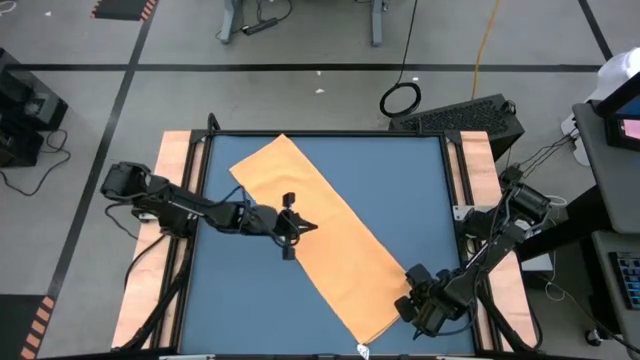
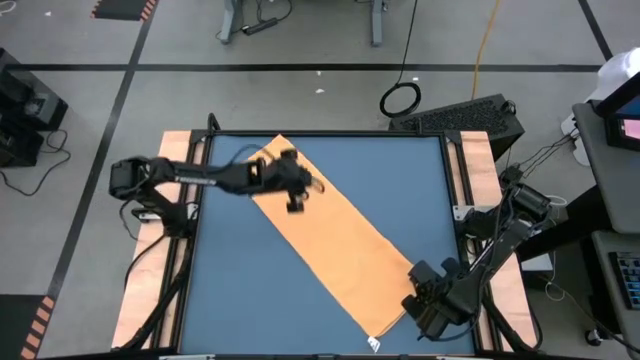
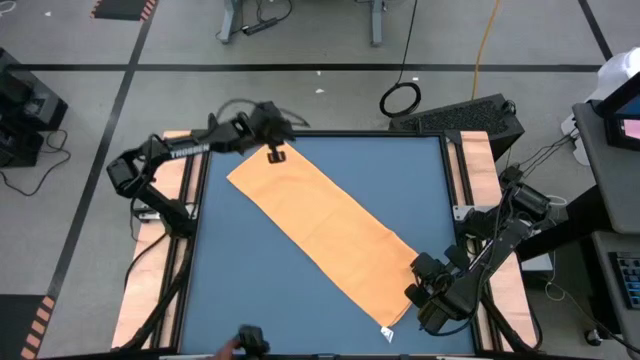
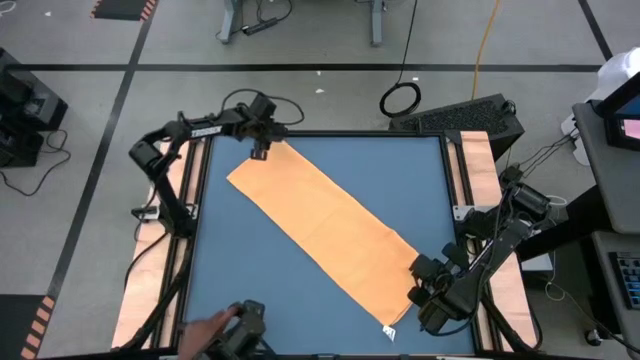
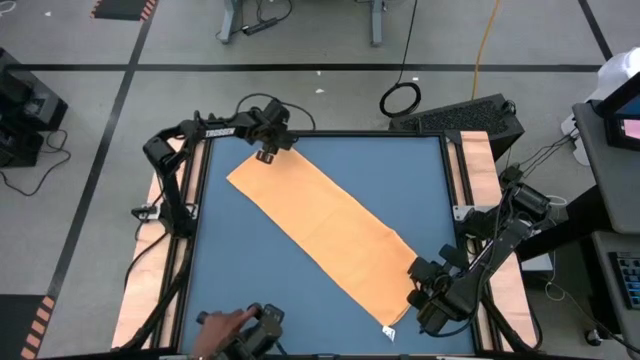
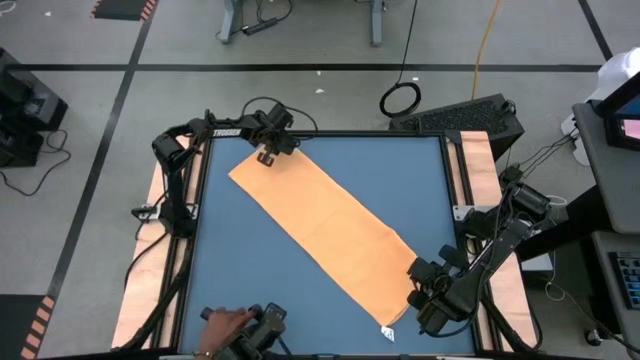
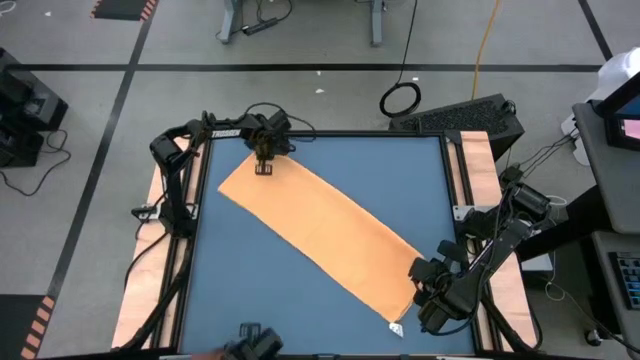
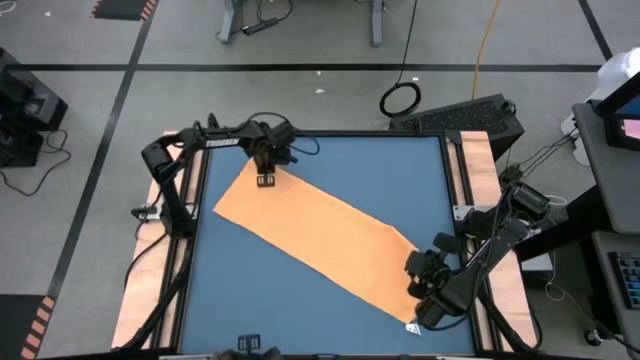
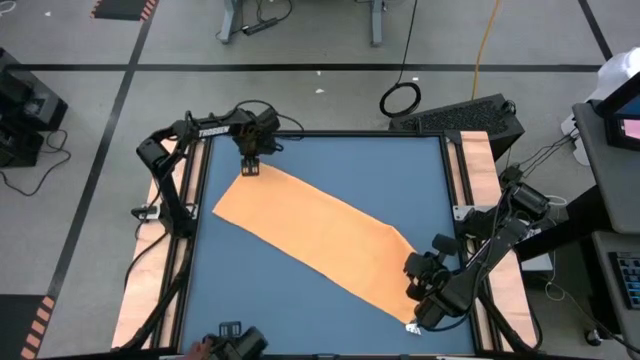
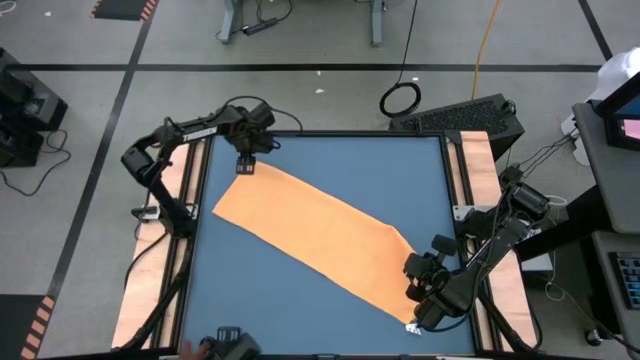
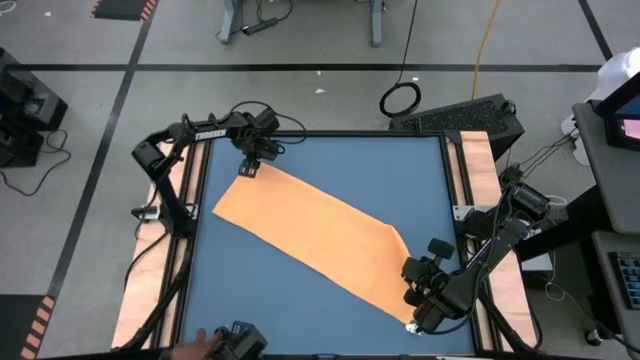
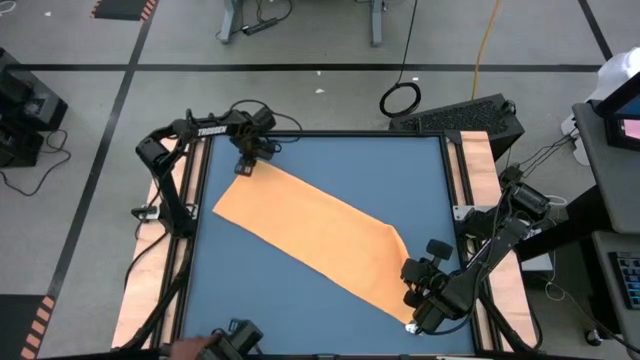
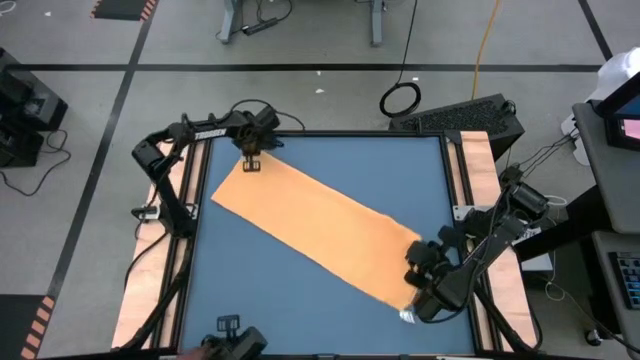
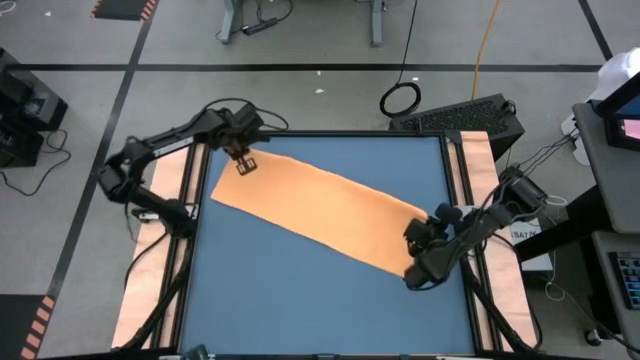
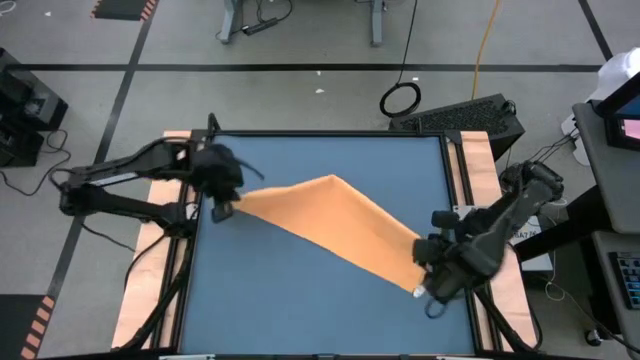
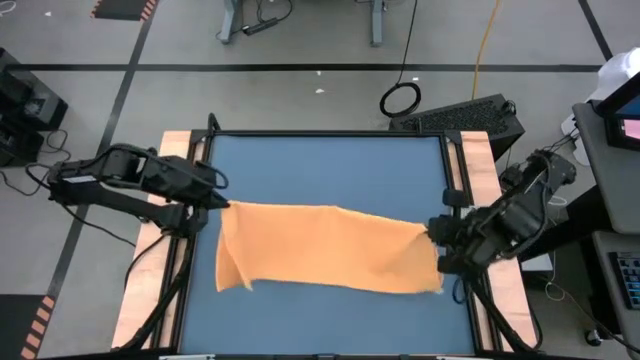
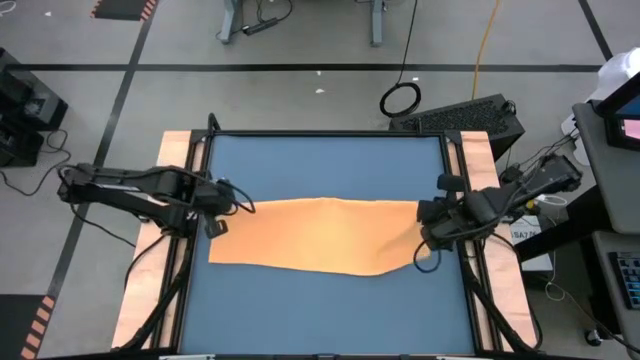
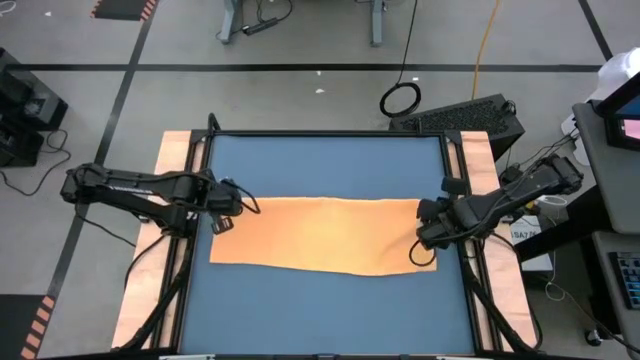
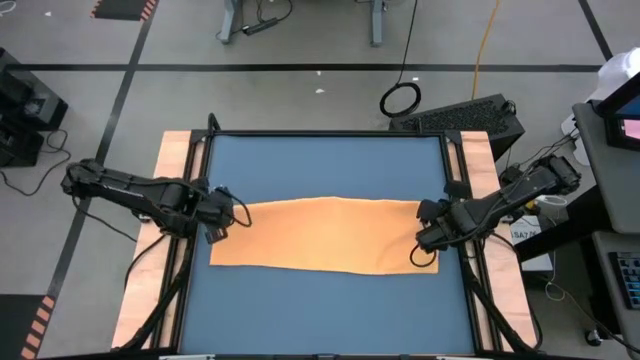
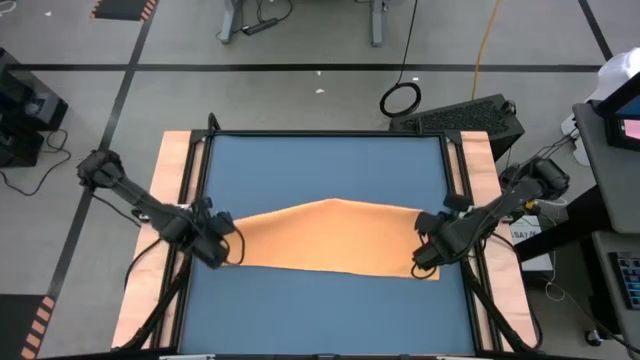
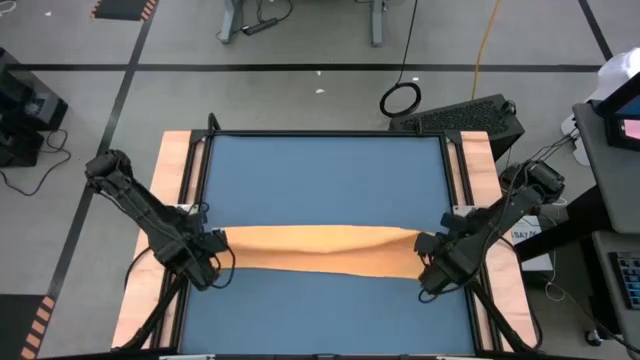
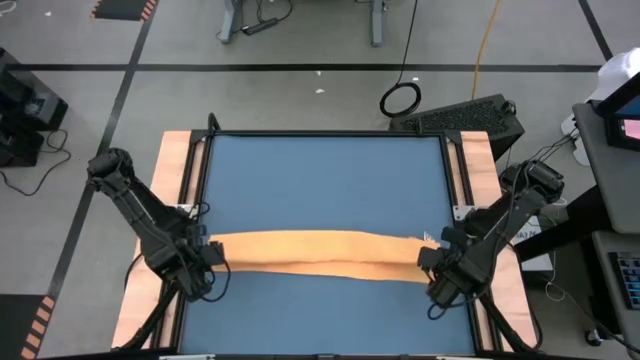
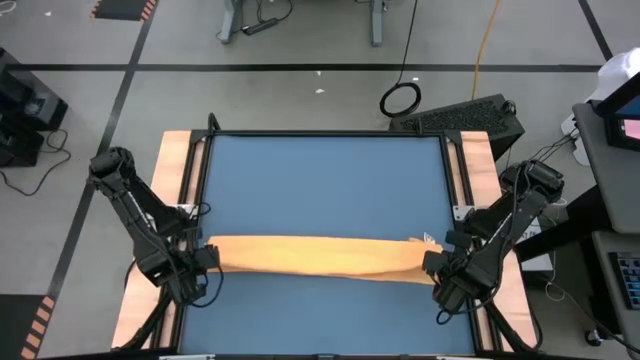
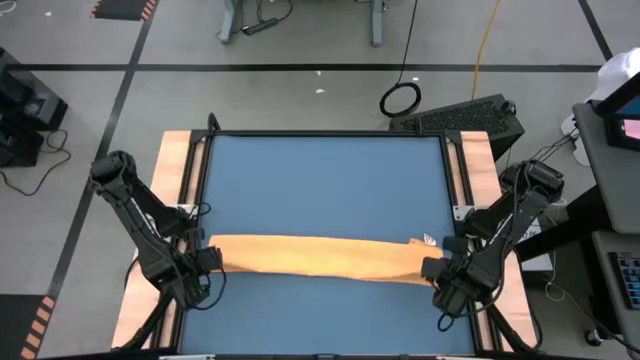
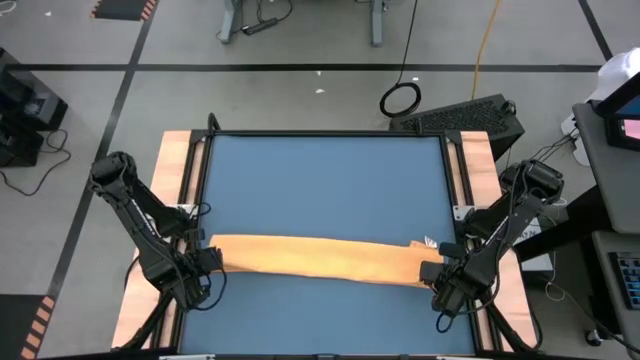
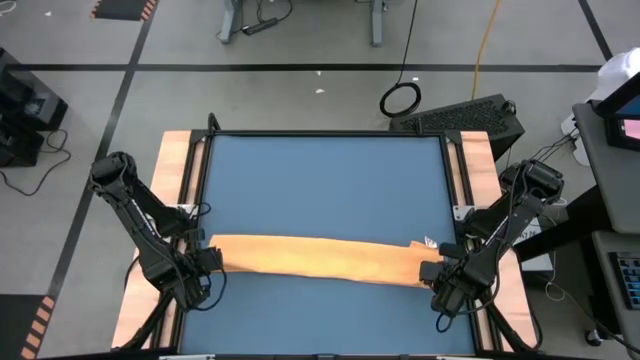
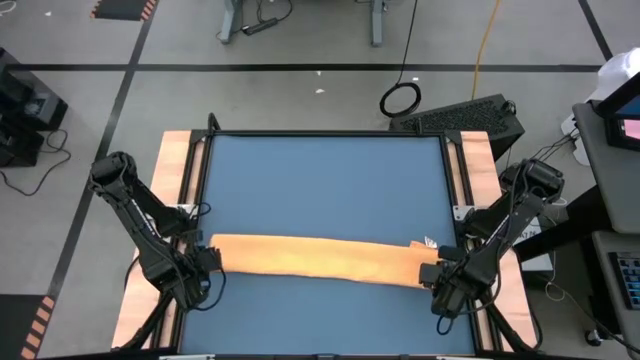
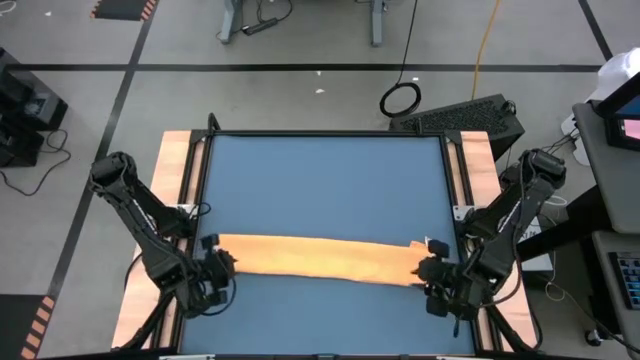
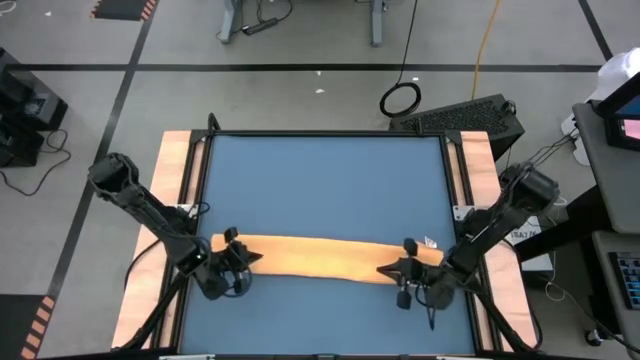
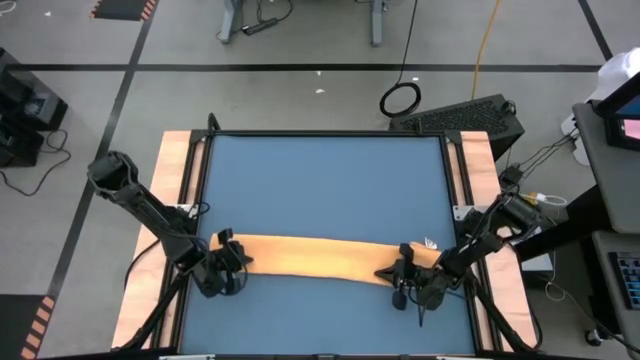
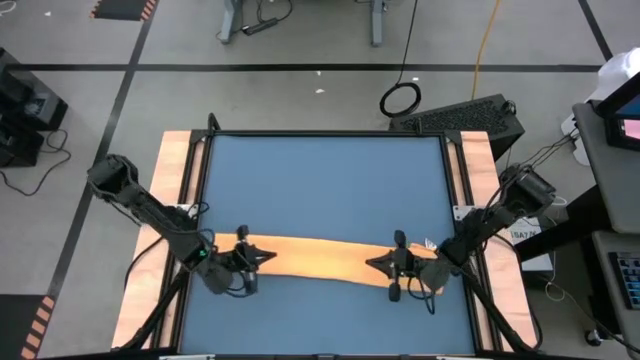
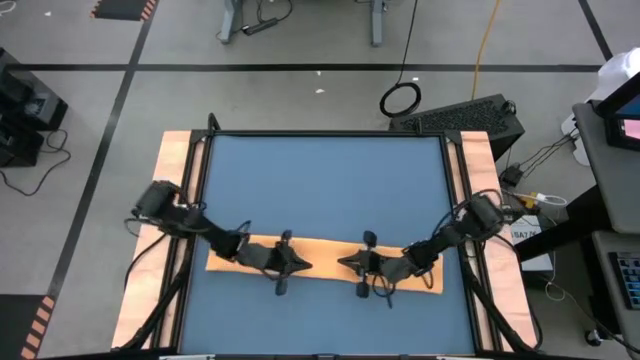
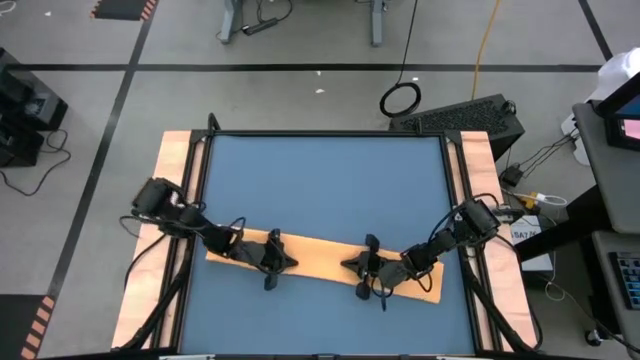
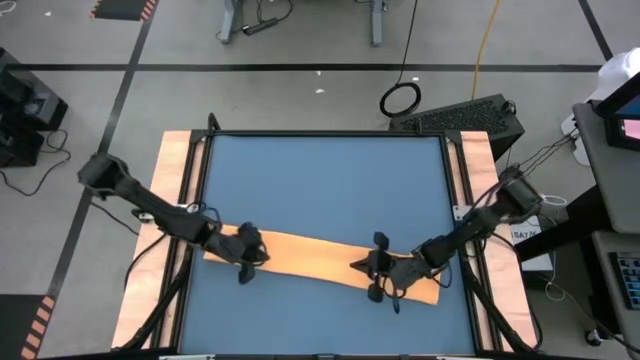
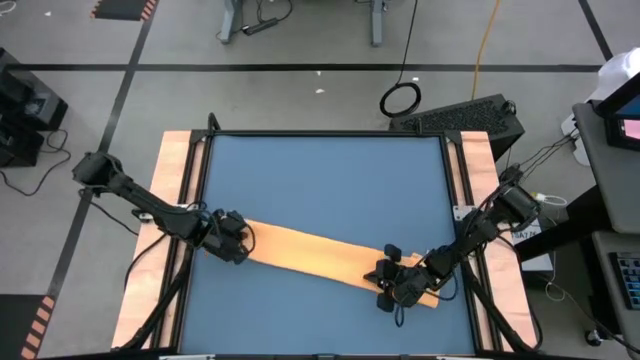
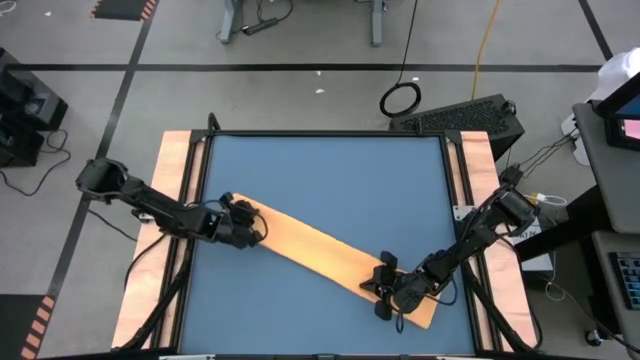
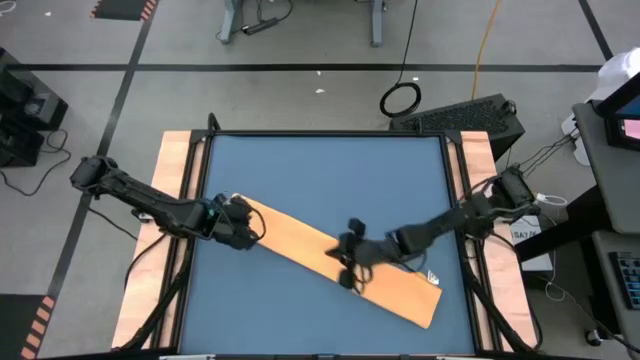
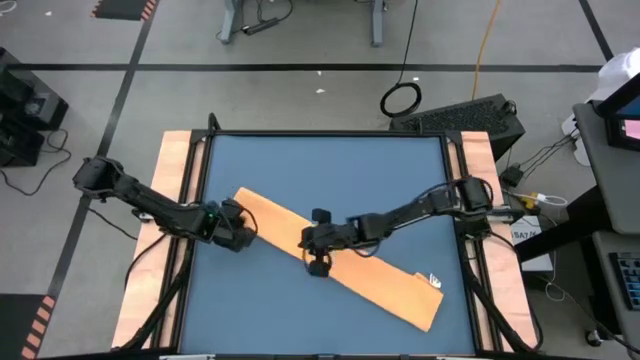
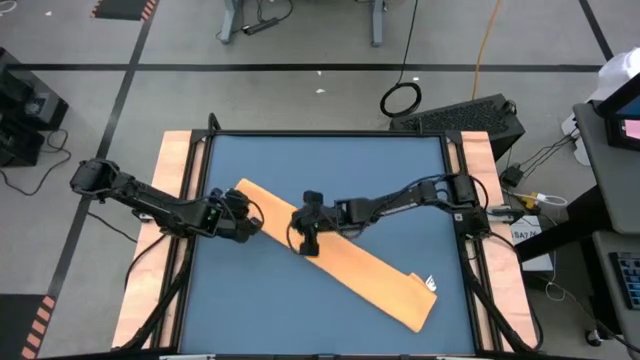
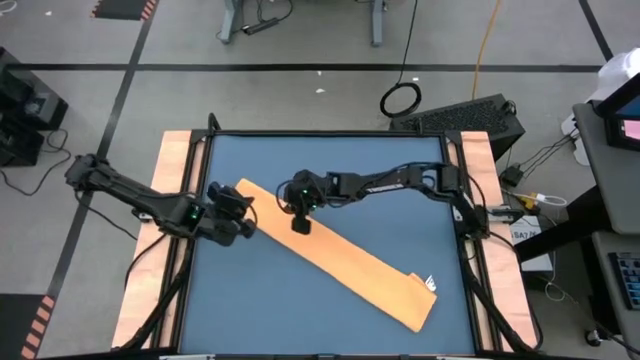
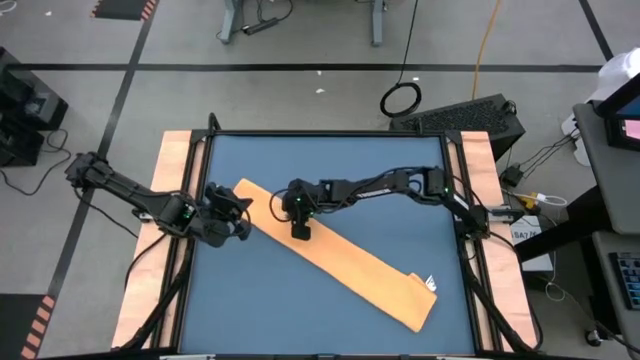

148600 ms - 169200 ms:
Task: Roll towel into tight, uniform cylinder
Fold the orange microfiber cloth

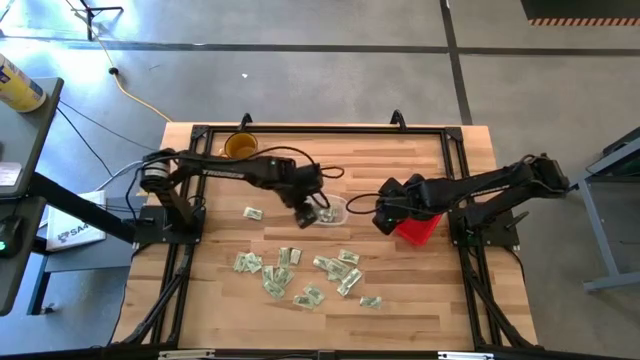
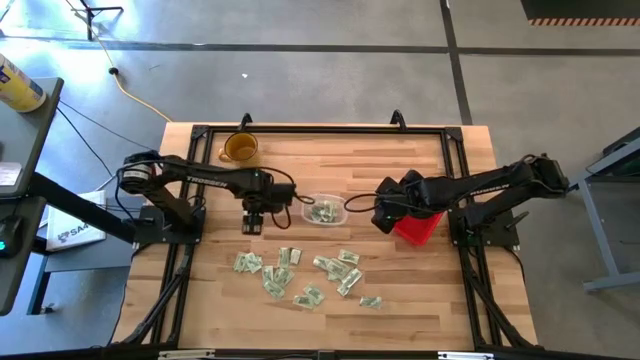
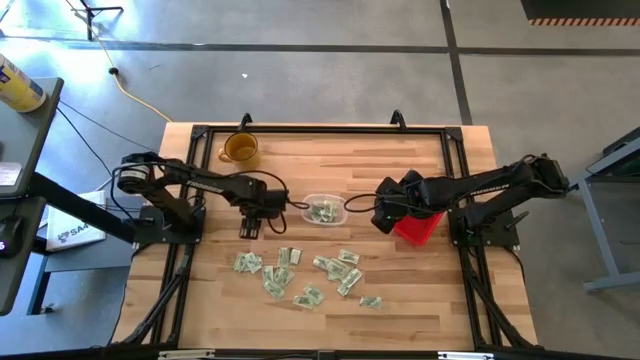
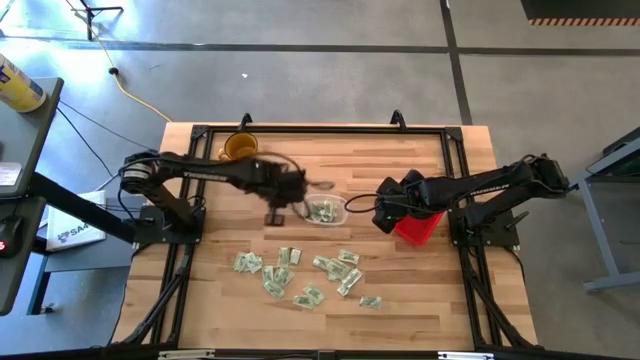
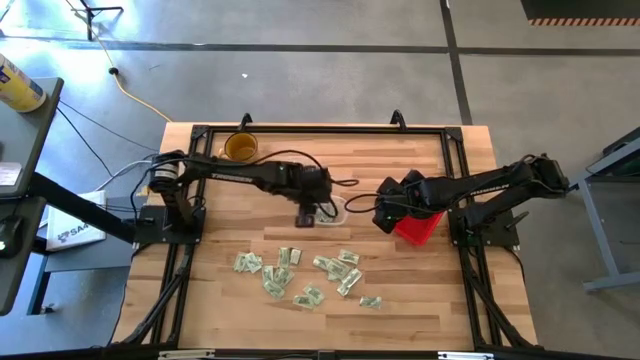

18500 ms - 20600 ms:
Task: Pick and place items into bin
Put the white stevia packet into the transparent bin
